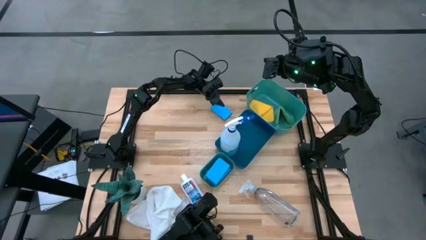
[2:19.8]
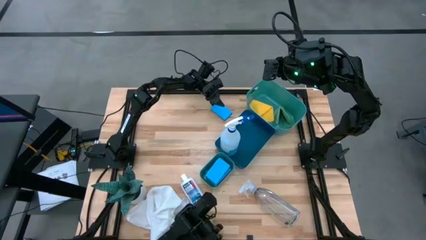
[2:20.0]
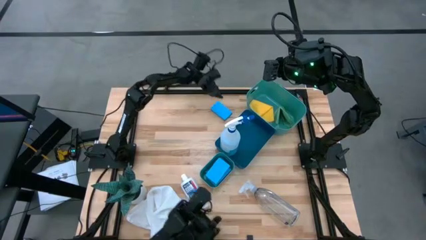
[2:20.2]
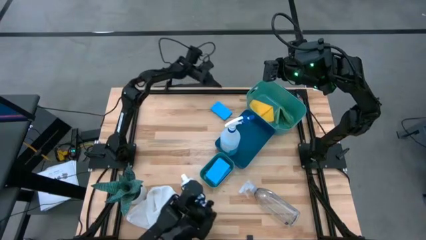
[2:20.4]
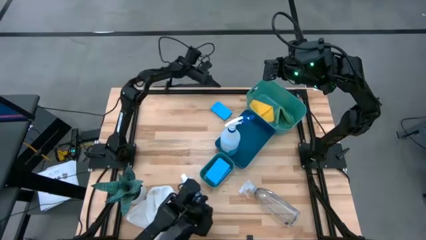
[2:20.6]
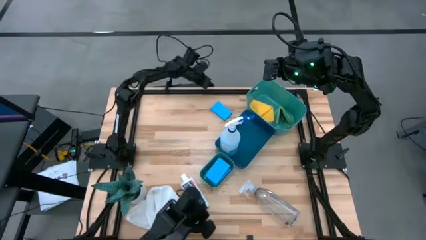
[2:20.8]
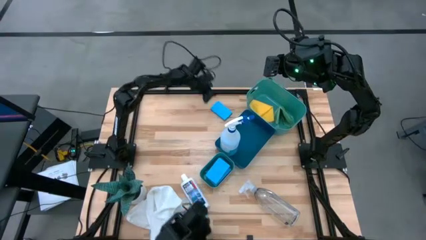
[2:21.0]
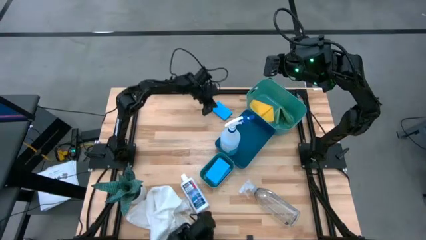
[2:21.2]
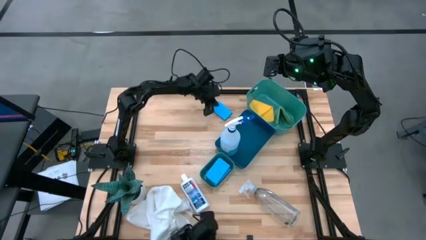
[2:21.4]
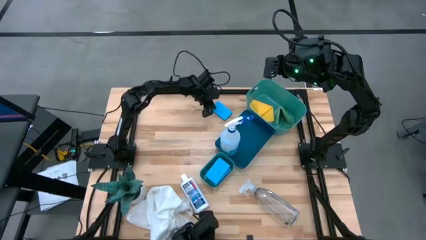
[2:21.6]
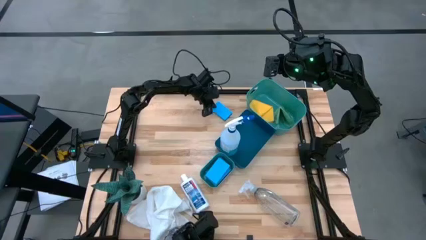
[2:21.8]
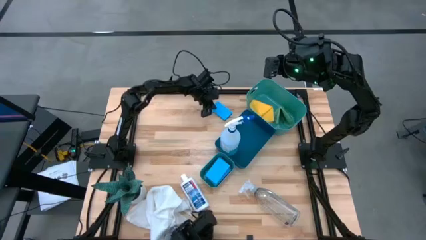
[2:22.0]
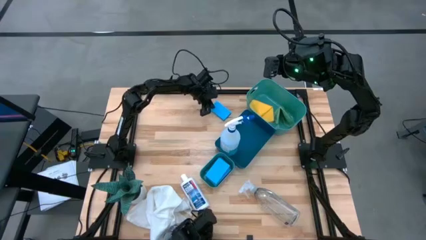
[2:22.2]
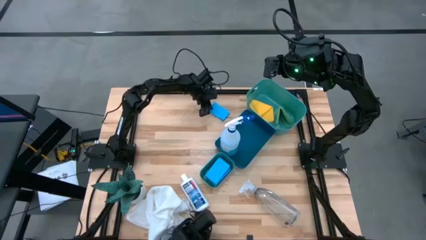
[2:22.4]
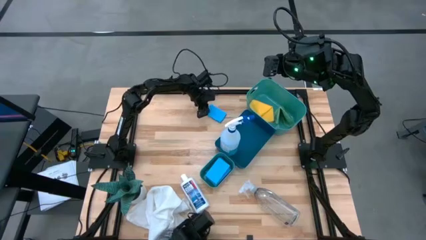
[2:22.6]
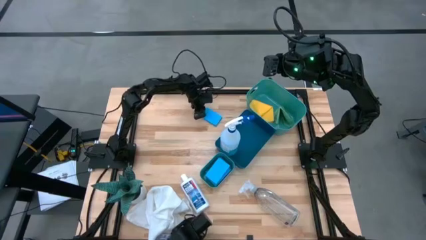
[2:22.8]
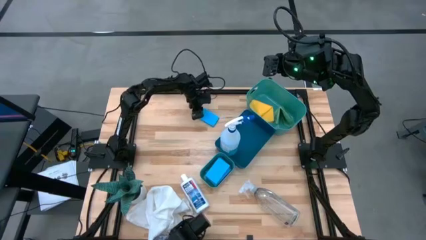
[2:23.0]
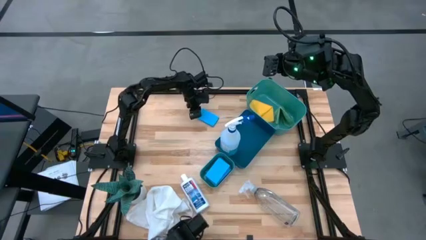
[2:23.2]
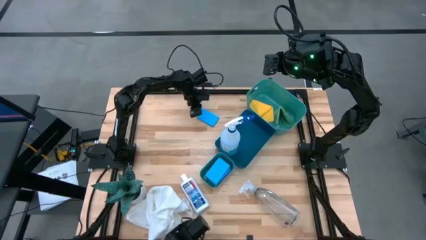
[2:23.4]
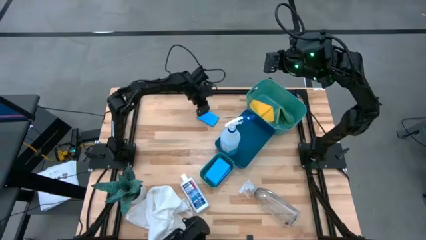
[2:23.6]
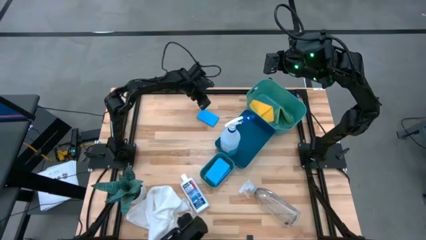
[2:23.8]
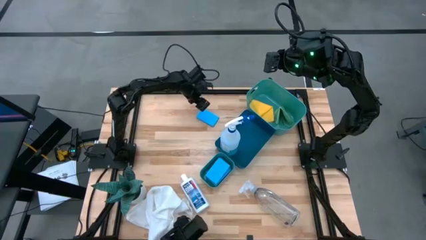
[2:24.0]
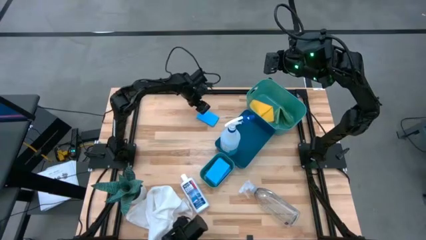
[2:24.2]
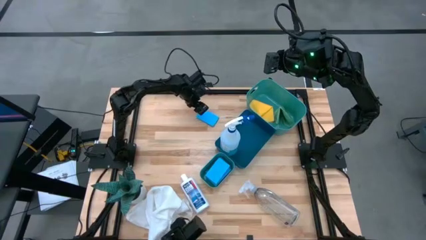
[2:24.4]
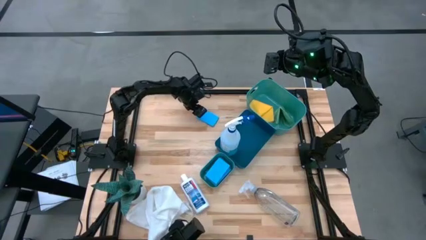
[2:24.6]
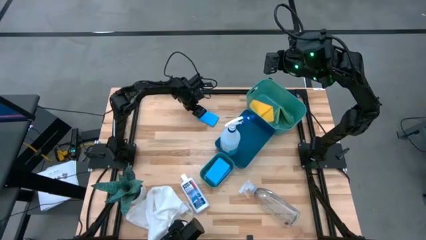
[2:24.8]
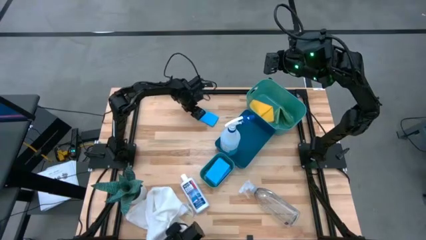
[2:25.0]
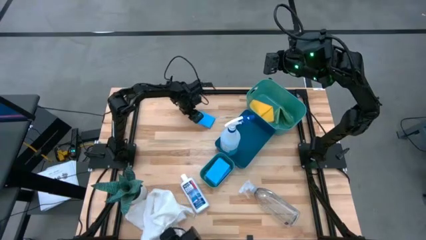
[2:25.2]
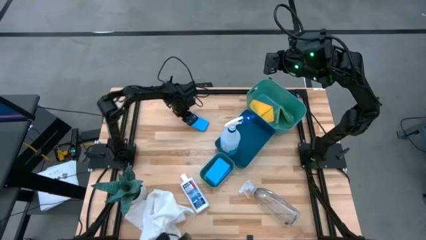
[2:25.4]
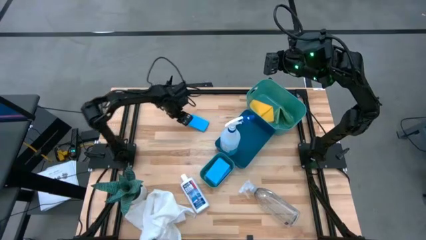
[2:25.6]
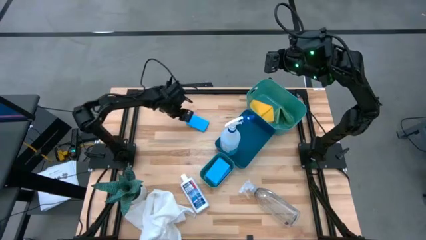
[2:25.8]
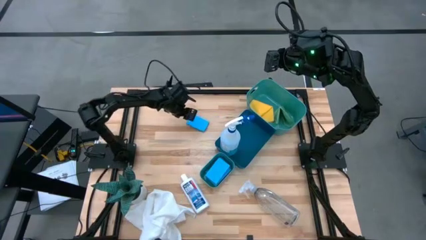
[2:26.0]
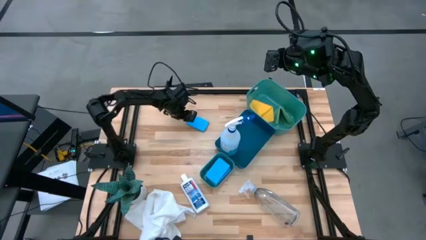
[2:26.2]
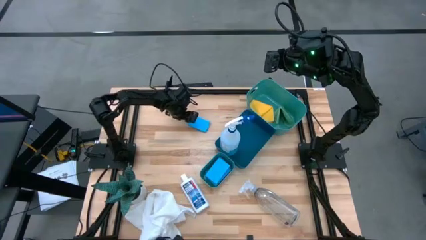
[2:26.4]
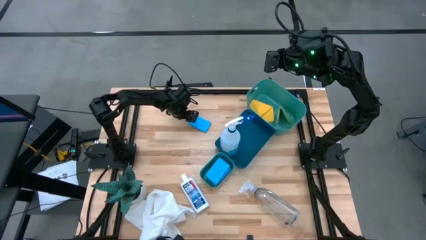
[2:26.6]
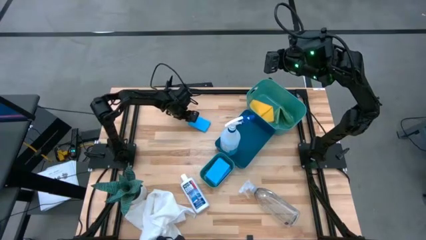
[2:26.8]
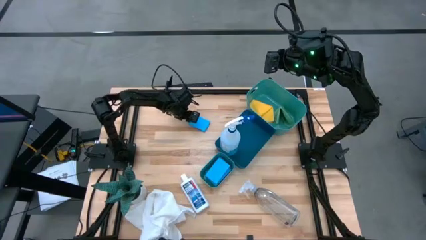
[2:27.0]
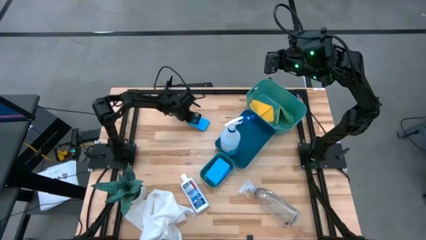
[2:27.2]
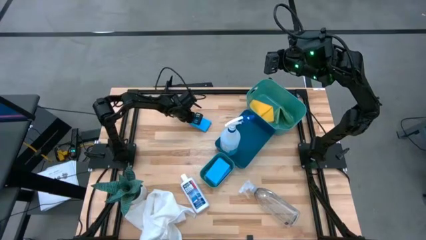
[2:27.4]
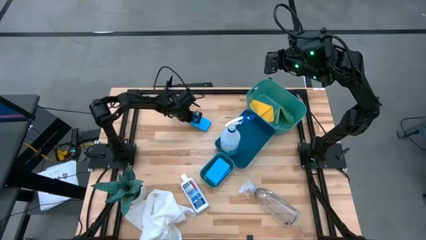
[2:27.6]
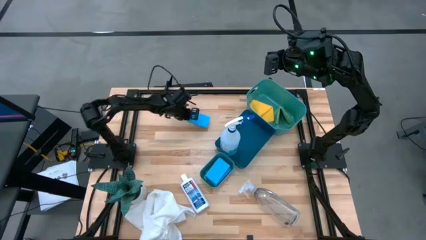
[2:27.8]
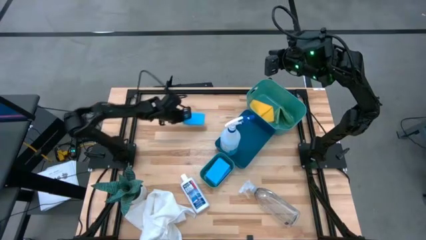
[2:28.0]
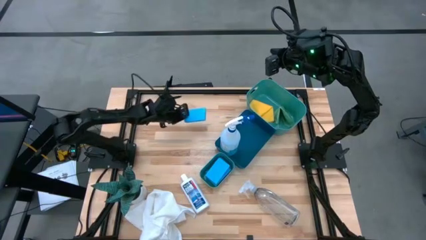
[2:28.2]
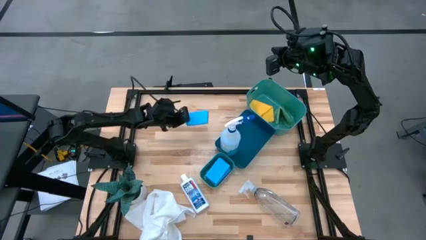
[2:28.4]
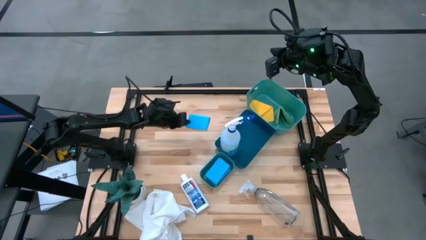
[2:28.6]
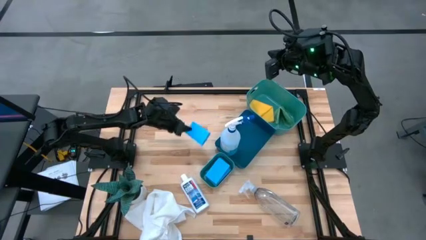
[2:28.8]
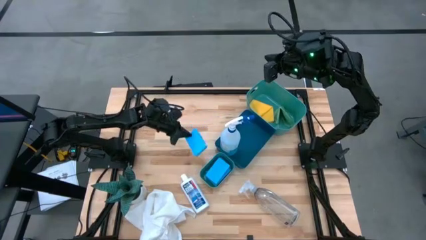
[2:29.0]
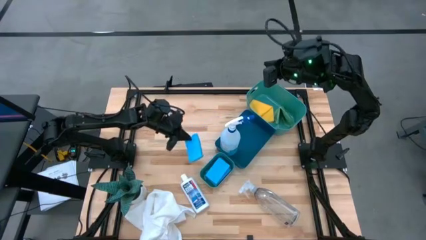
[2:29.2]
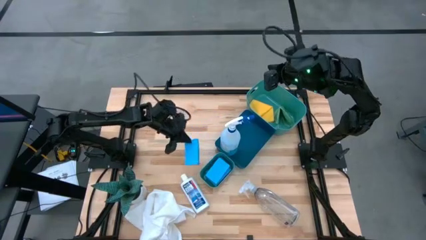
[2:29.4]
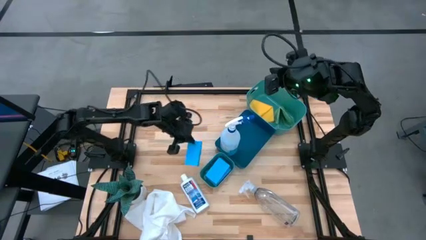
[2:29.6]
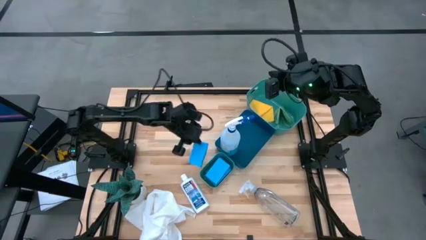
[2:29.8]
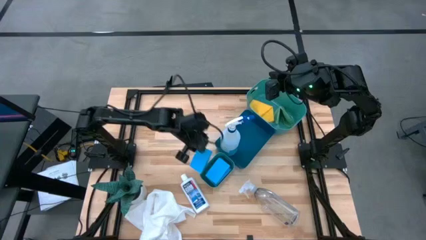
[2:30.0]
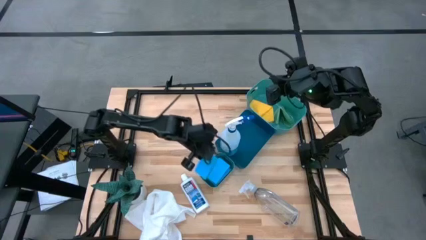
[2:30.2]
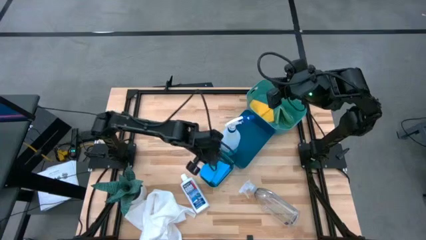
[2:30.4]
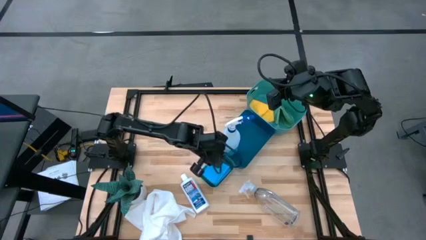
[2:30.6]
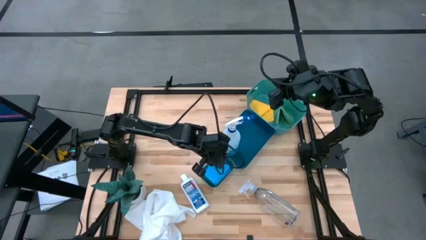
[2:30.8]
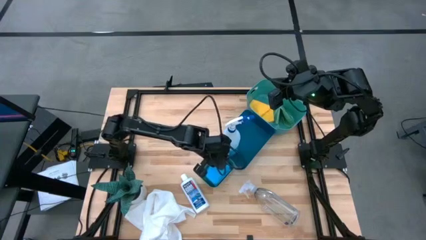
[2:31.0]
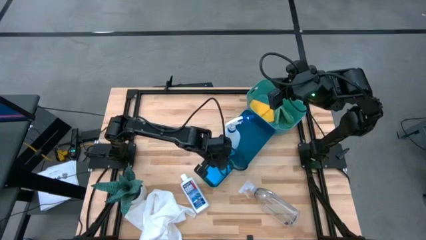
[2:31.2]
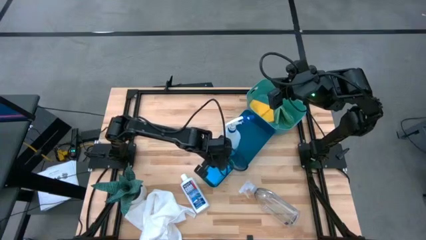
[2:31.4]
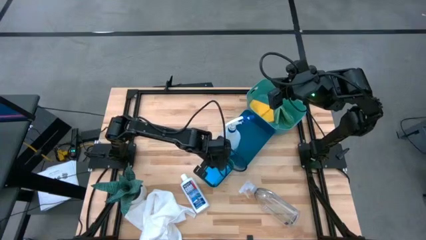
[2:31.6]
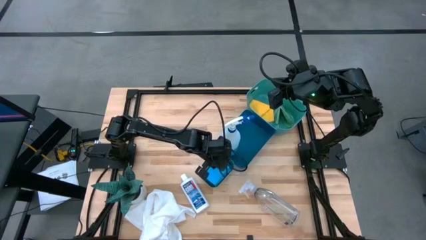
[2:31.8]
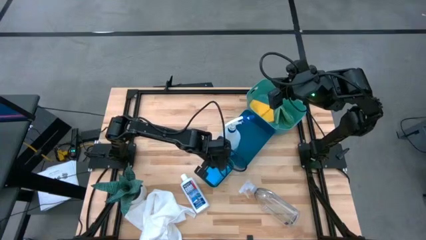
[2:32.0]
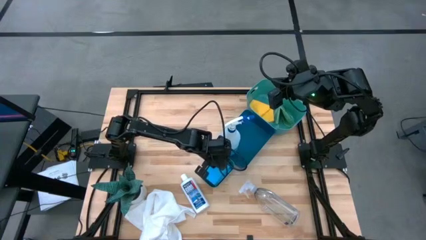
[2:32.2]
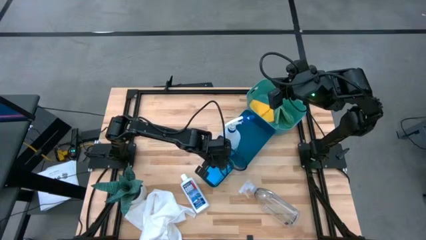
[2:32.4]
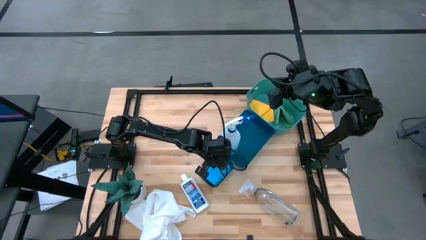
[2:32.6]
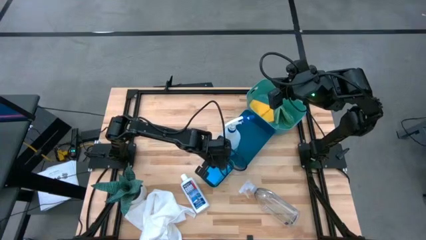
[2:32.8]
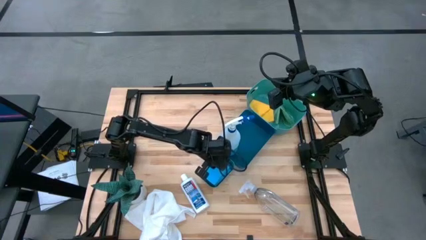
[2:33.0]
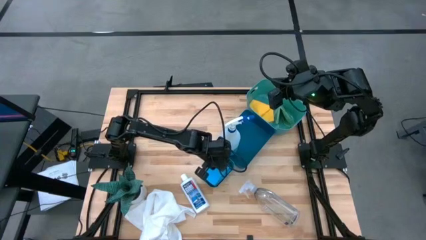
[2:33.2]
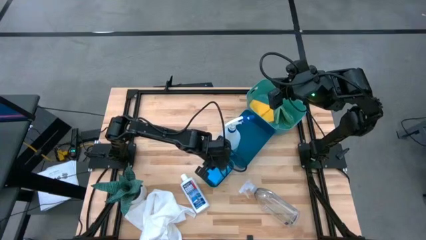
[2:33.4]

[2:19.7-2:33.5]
Task: Pick & Place Kitchen Items
Put the light blue sponge into the bottom green bin

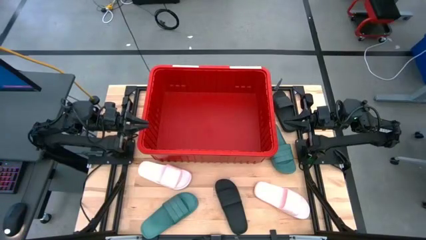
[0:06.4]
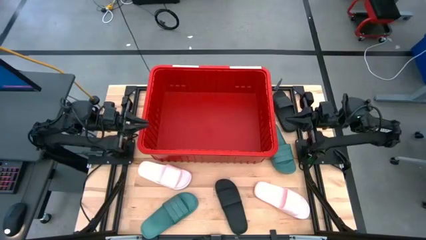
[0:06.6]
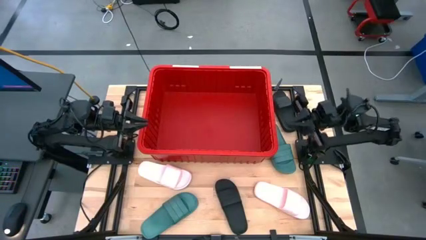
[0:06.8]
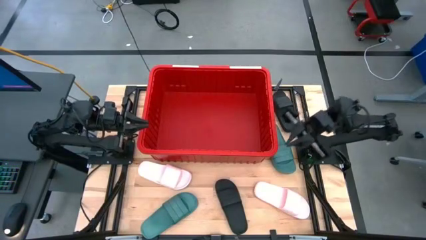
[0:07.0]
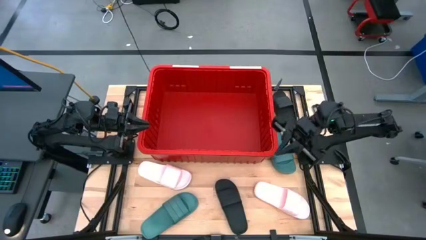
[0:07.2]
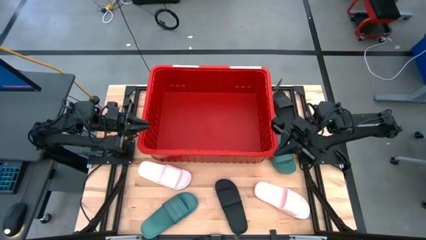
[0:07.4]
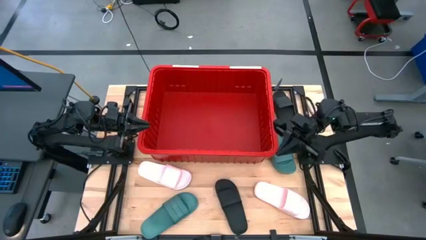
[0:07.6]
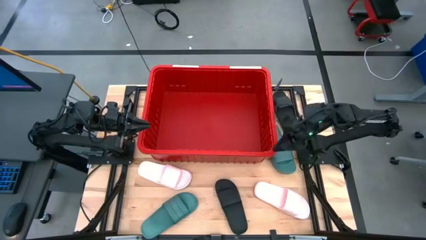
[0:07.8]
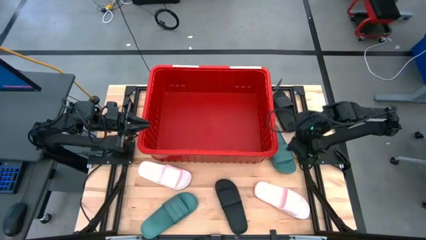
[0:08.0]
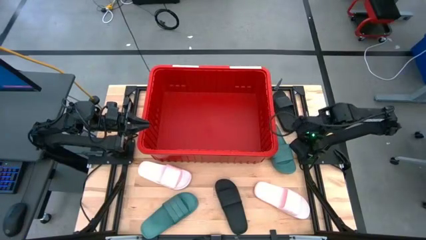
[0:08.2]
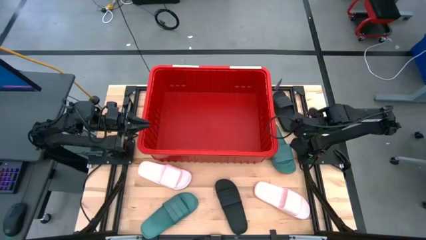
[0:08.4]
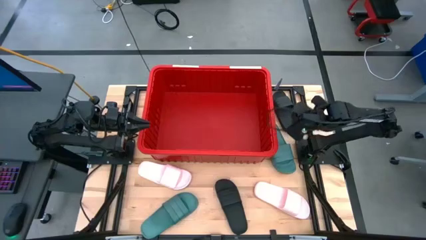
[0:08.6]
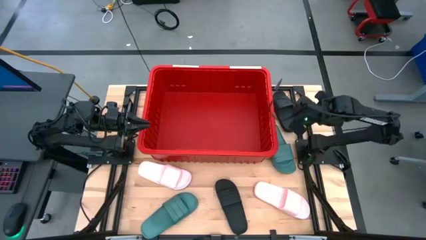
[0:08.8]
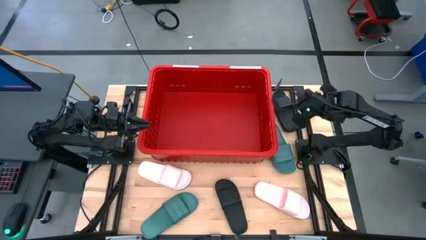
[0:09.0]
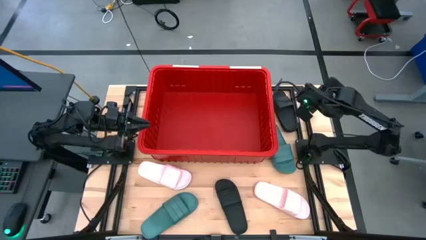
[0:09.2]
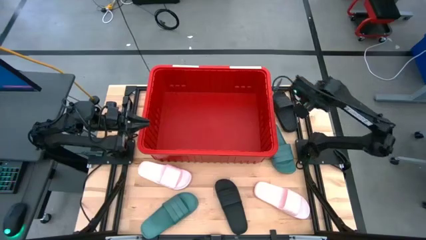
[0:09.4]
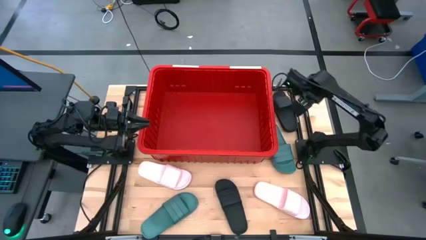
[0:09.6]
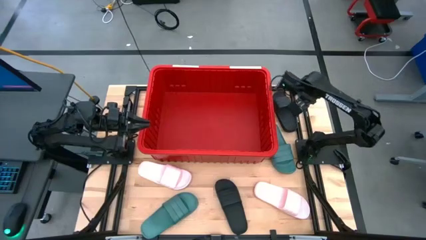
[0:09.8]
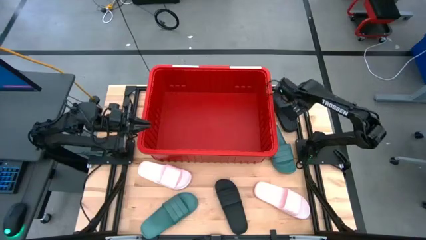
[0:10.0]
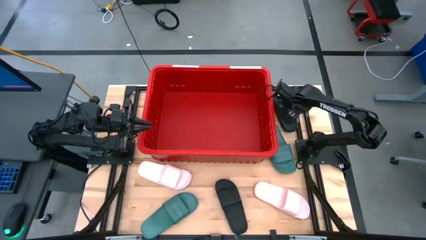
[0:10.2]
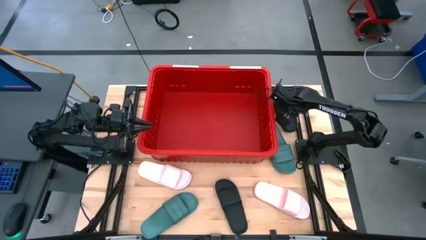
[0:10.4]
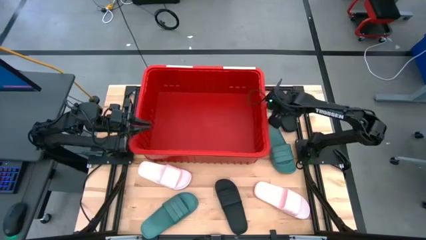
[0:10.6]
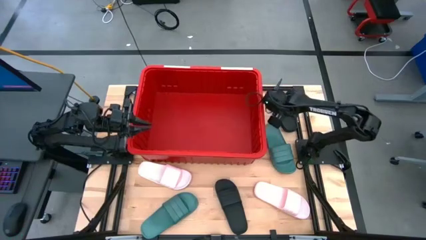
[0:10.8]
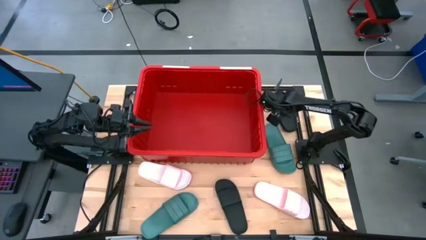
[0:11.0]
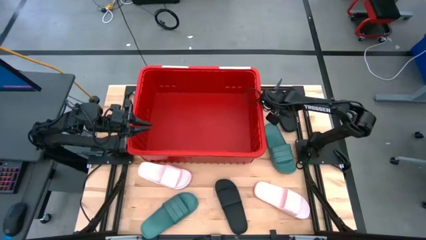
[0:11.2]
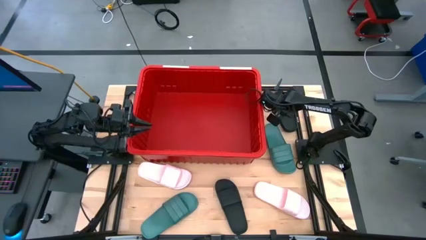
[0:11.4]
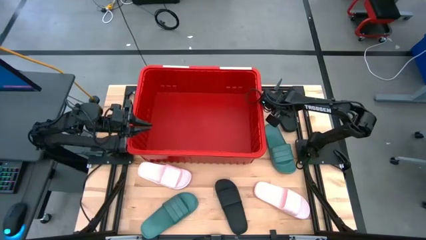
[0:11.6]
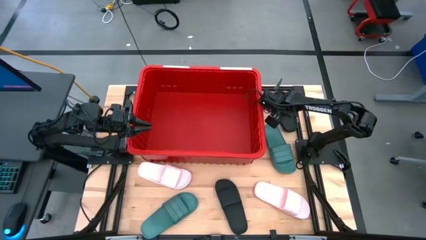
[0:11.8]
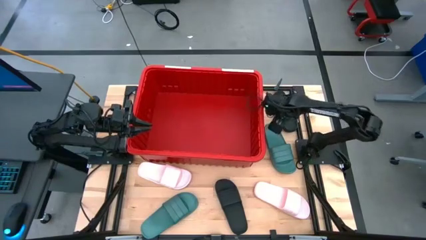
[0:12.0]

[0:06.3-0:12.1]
Task: Pick and place slides into bin
Adjust the red bin
